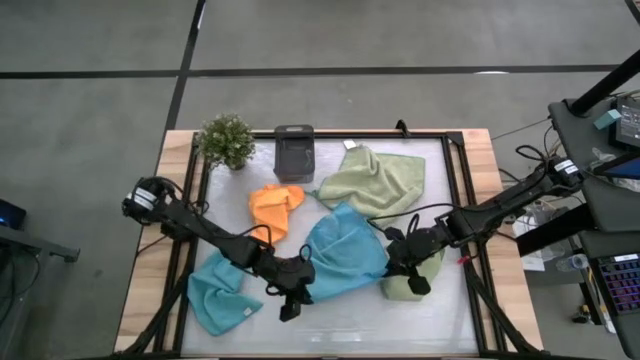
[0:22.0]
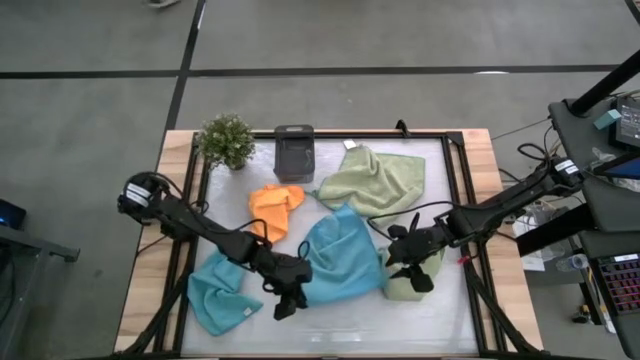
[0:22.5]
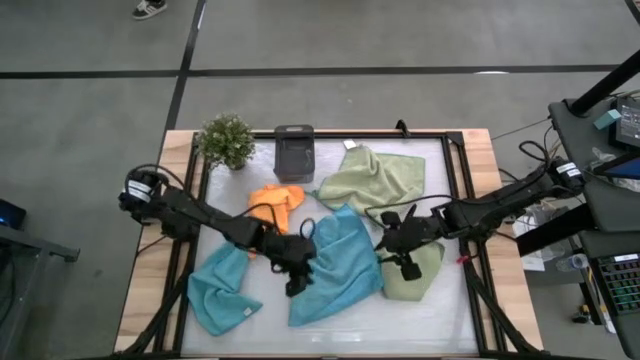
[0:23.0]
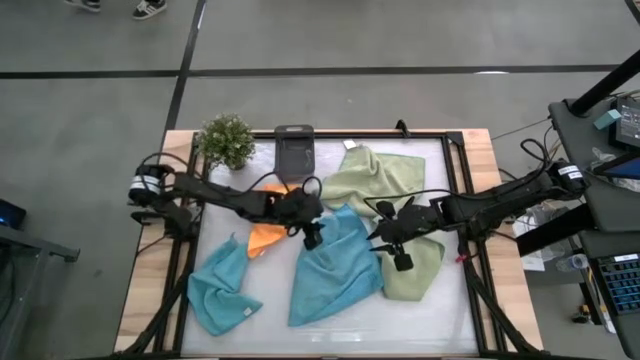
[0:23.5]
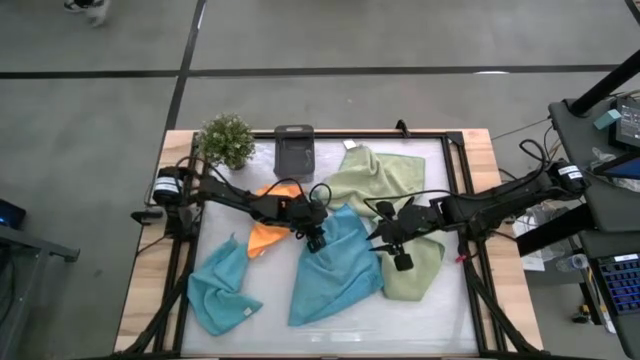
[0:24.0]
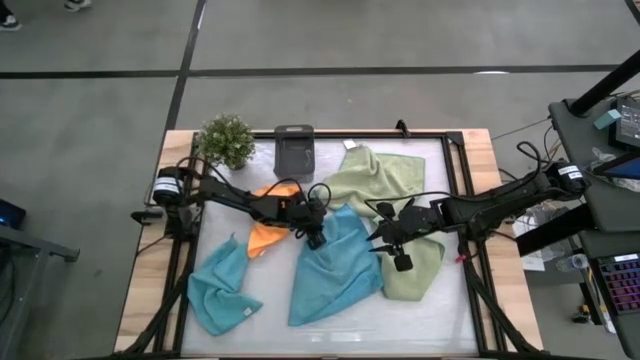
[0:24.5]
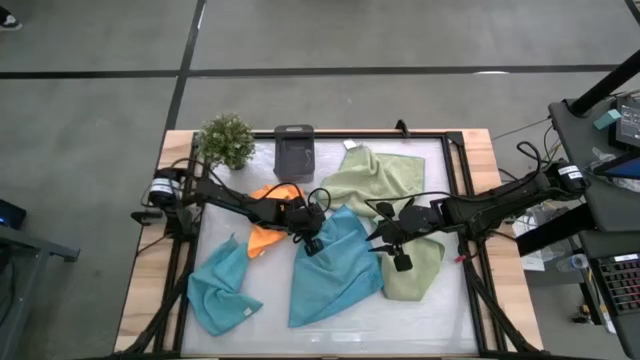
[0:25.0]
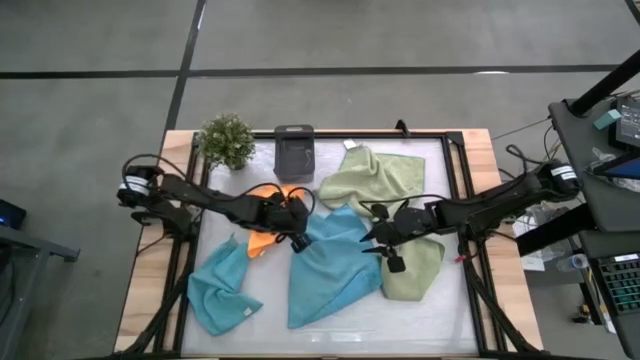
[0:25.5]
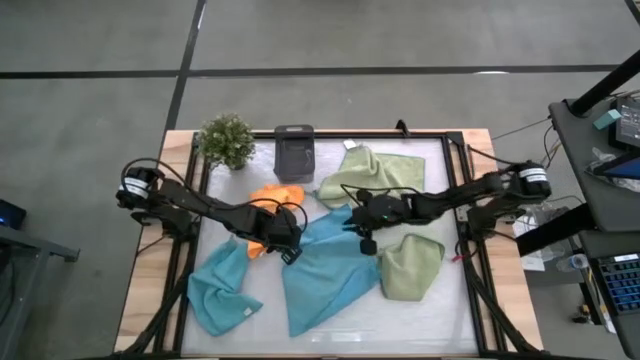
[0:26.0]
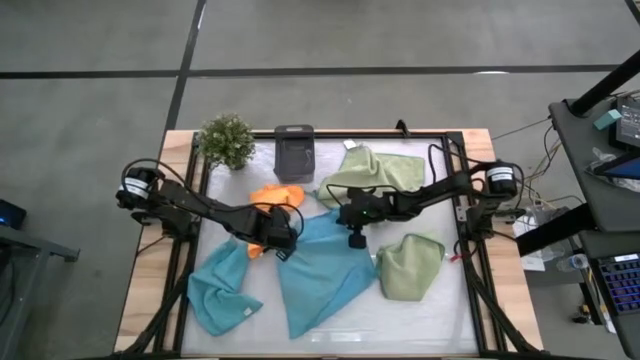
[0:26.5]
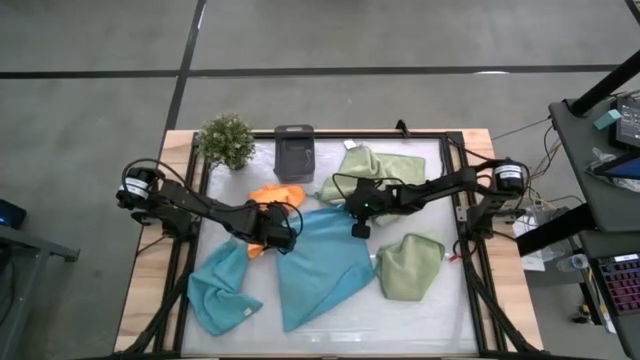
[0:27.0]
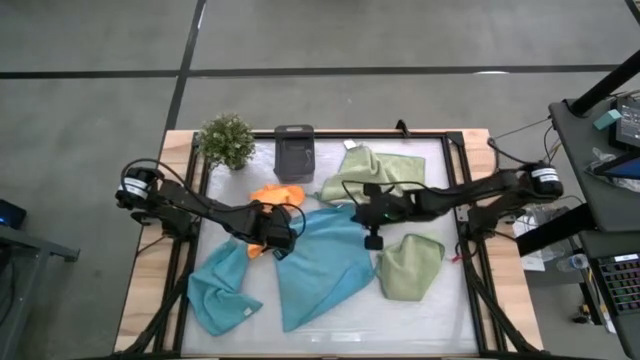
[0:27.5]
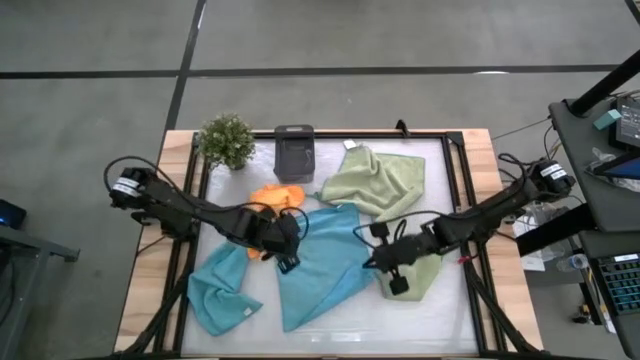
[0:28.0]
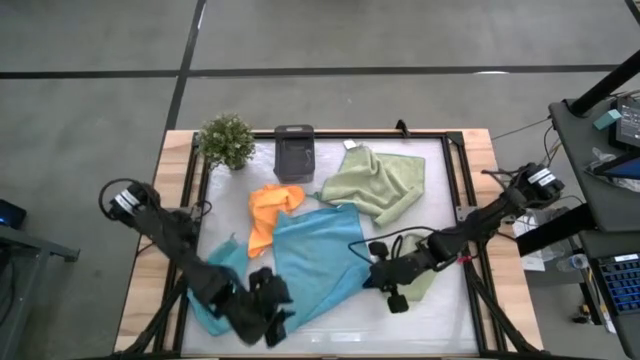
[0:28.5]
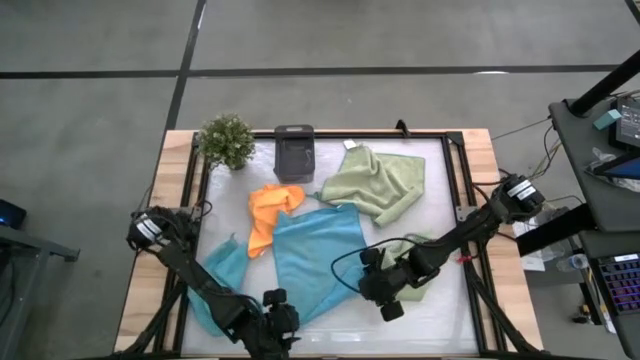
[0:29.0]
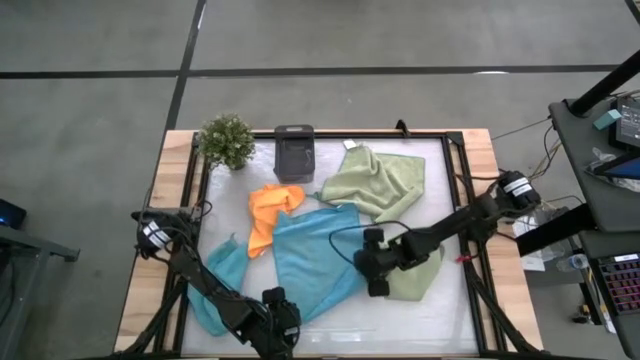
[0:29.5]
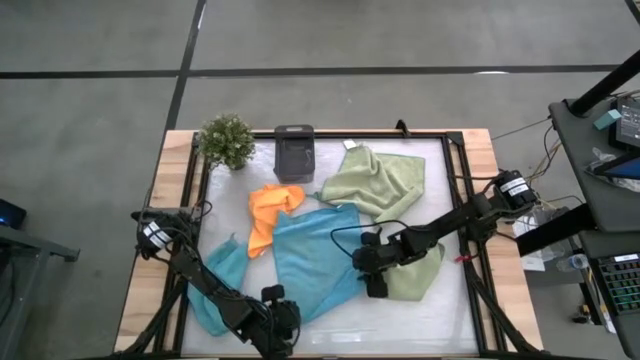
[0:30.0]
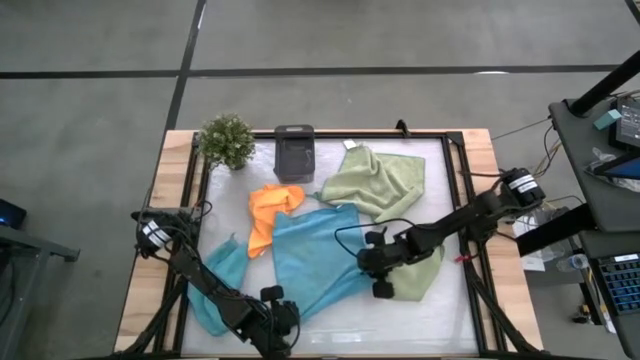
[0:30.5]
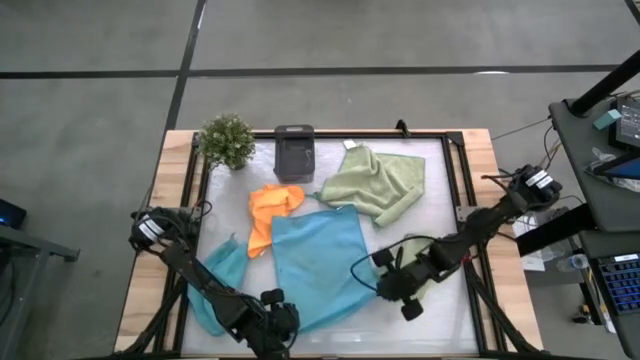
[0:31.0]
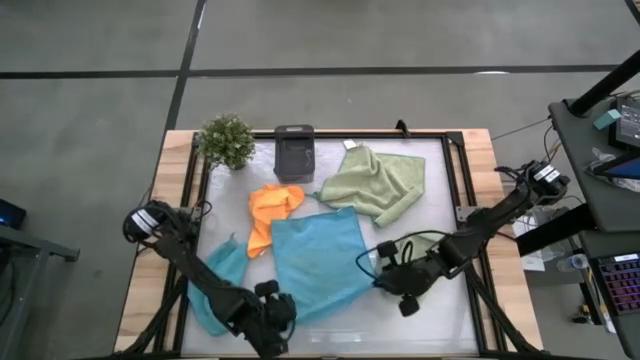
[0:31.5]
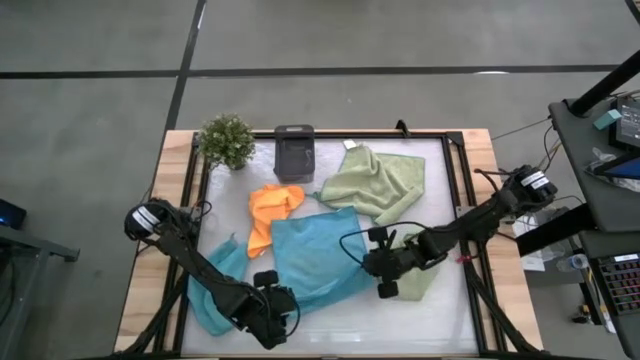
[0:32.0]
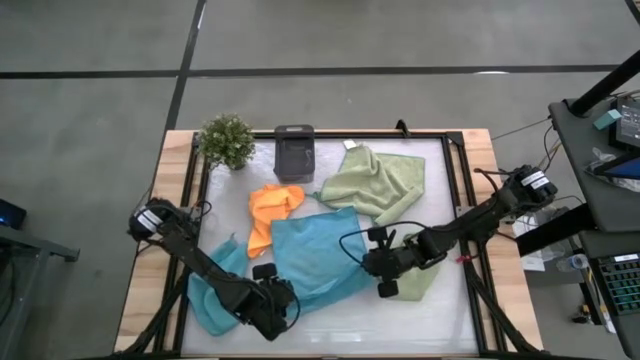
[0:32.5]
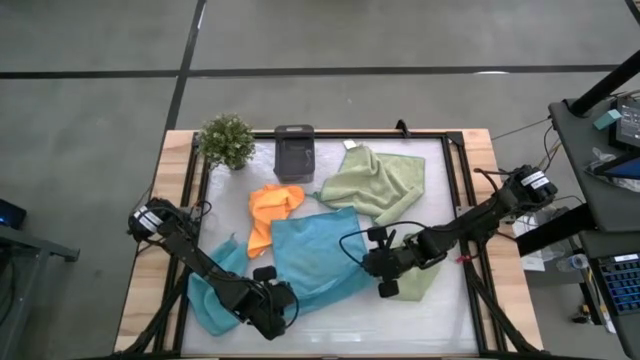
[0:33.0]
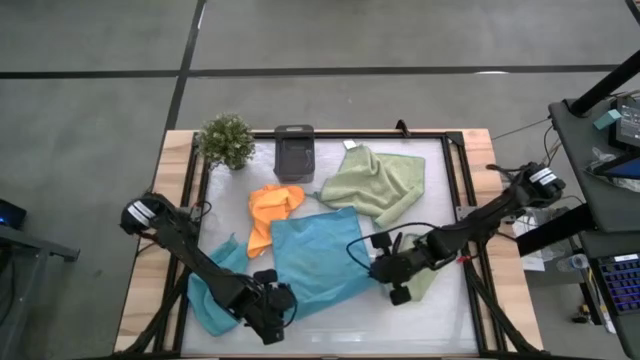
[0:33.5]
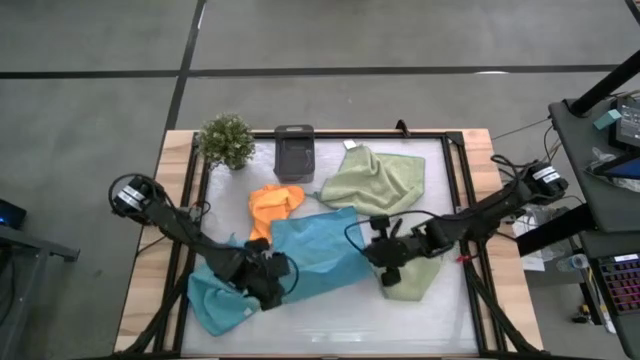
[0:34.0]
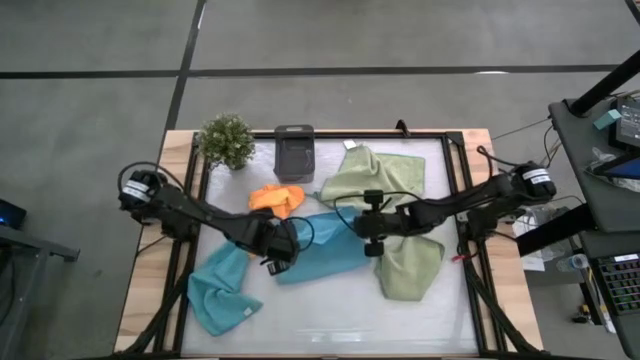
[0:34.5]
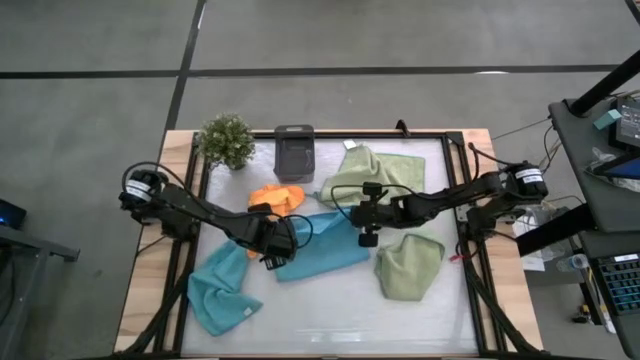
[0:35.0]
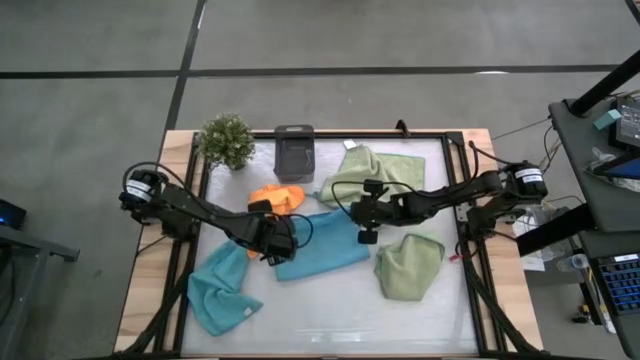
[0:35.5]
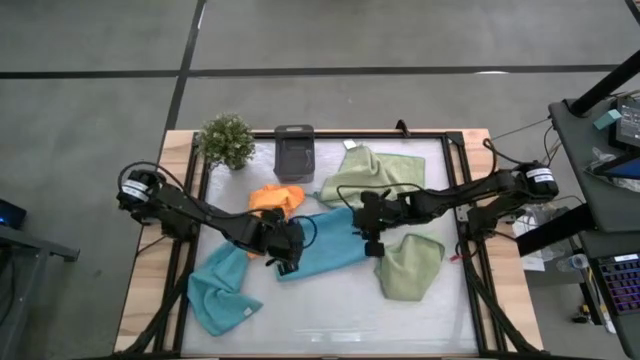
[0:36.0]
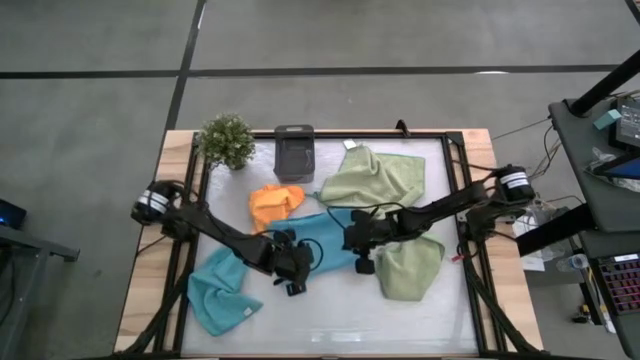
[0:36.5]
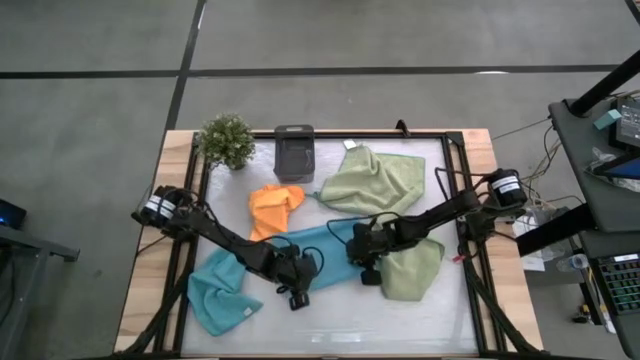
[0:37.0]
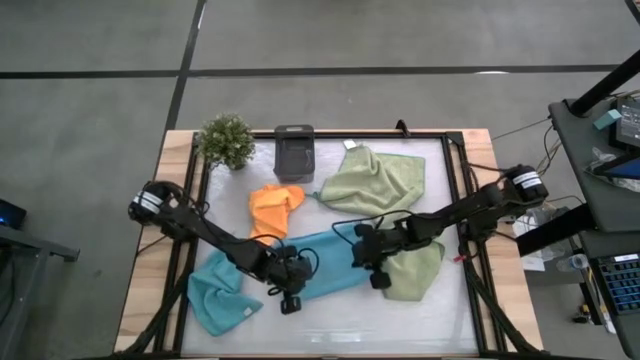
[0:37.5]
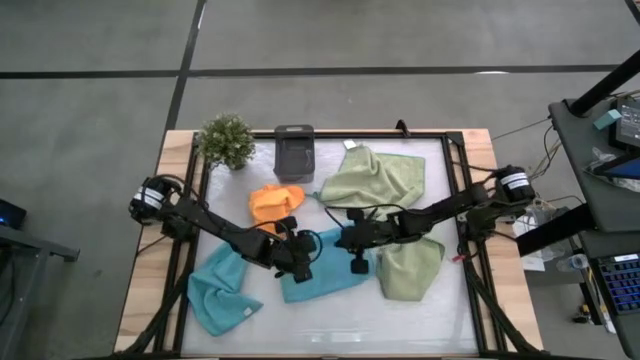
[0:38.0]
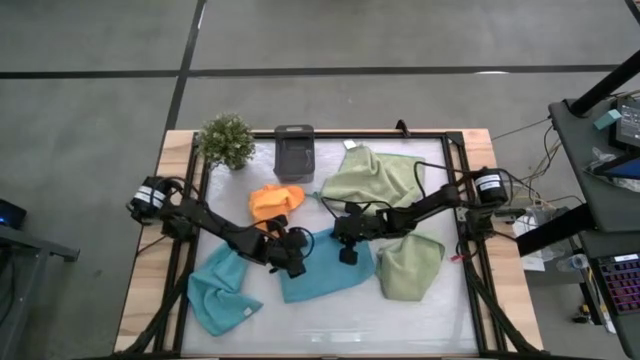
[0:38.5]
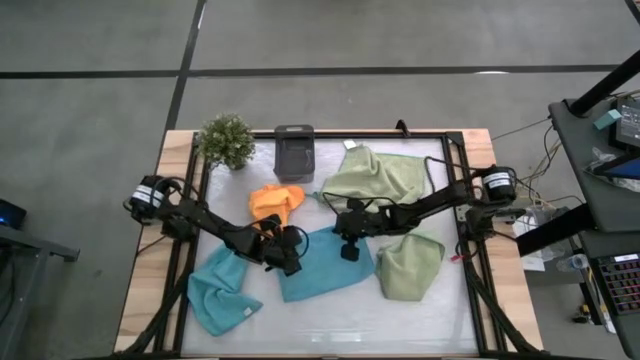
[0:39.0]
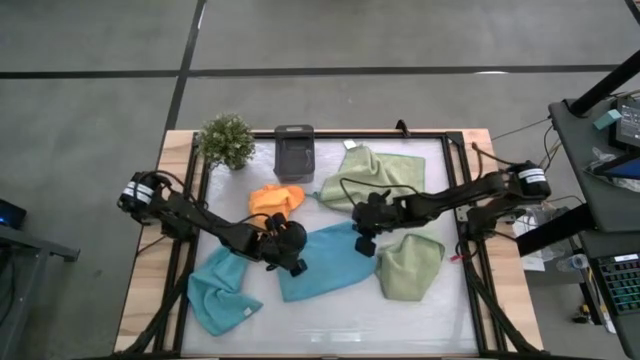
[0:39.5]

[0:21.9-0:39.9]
Task: Fold microfiber towels
Fold the right blue towel
